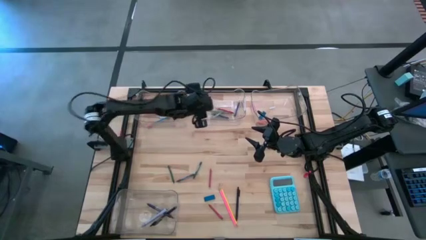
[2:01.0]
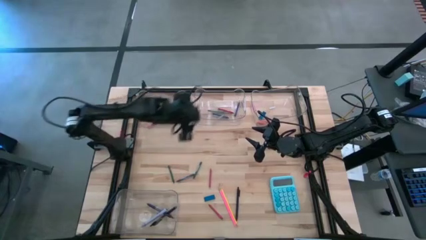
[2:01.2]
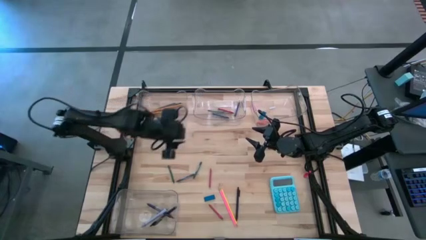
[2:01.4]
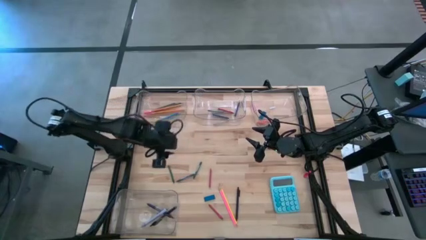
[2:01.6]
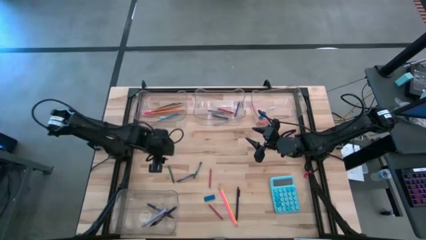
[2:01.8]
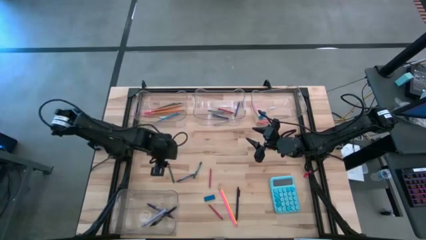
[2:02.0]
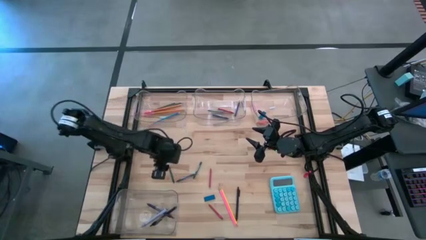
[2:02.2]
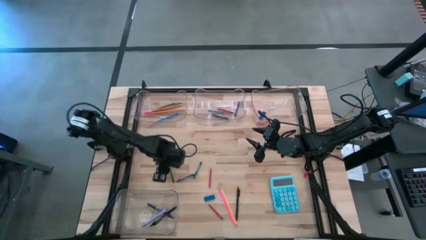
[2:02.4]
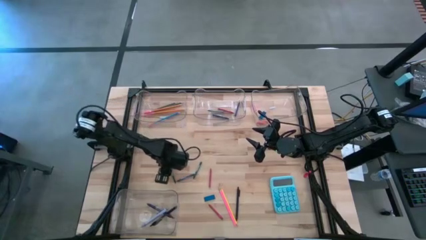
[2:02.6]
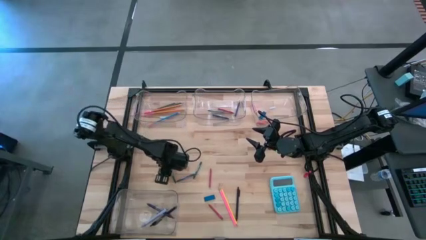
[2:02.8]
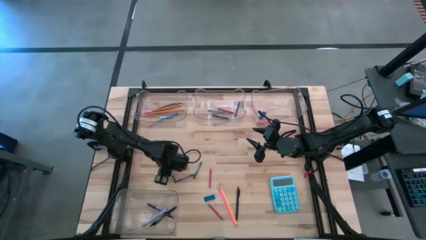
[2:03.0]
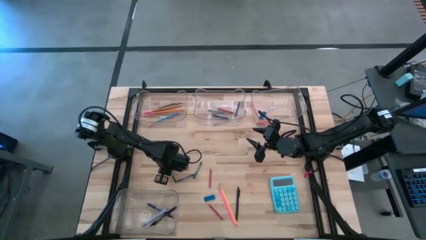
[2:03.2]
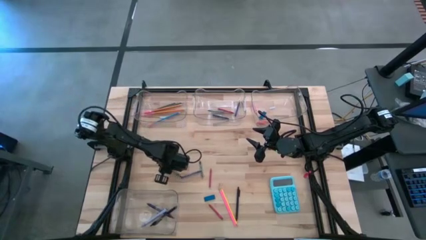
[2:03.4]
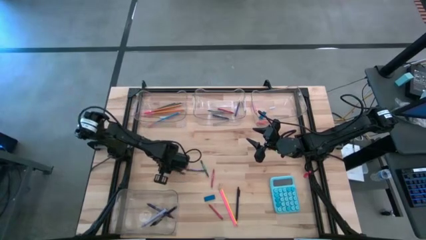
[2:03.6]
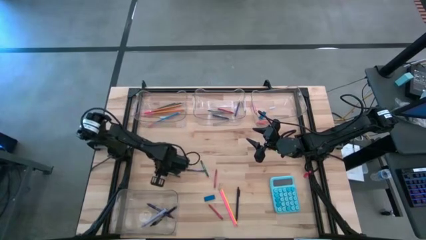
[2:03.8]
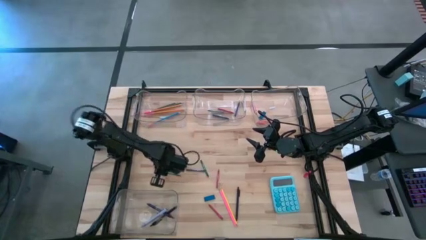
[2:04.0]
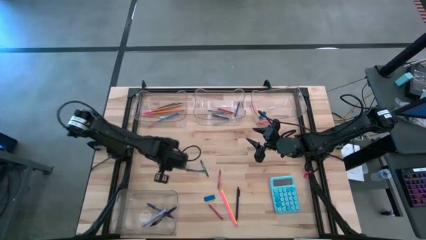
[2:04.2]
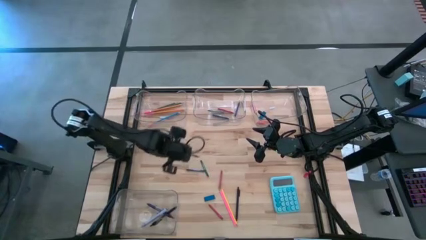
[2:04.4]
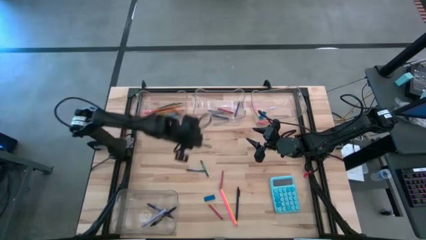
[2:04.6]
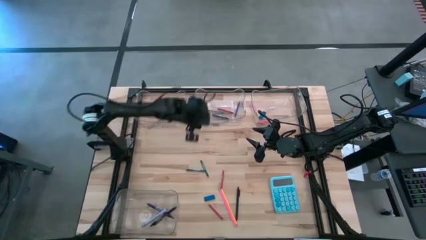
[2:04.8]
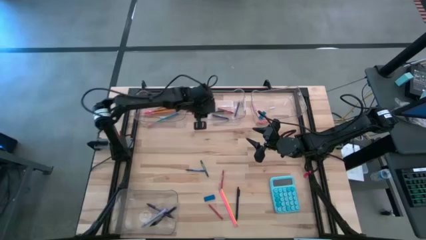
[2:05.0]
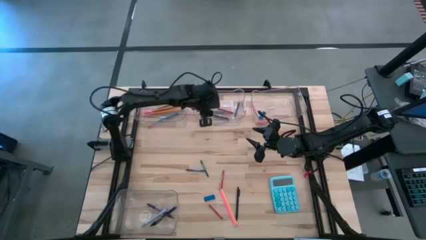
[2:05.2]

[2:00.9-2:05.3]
Task: Sort crayons/erasers/pens/pencils in bins
Put the green crayon into the top middle transparent bin

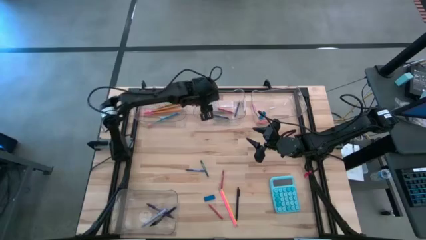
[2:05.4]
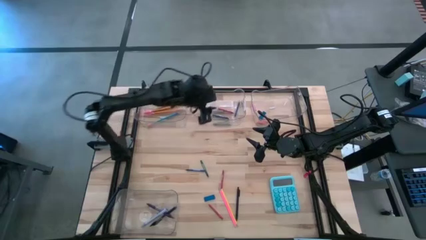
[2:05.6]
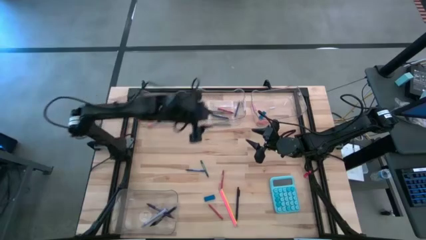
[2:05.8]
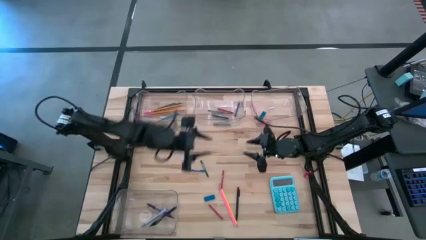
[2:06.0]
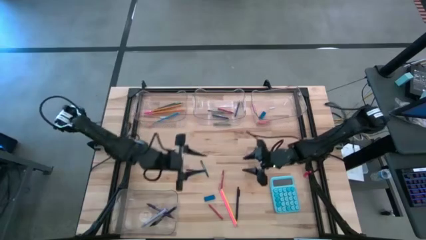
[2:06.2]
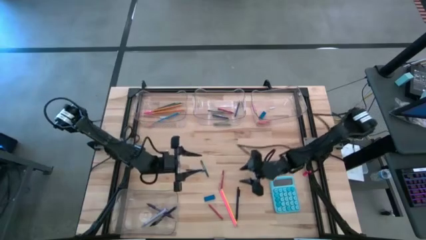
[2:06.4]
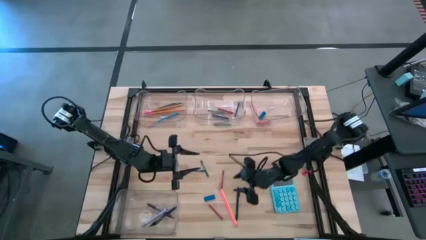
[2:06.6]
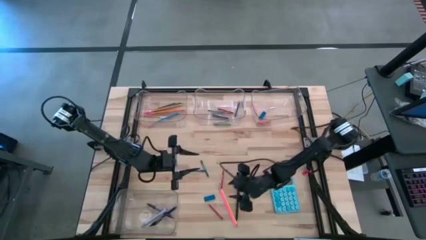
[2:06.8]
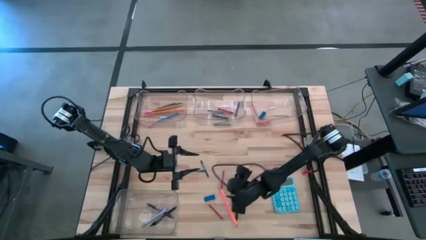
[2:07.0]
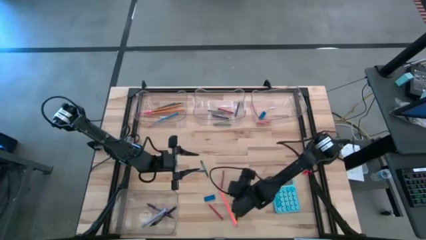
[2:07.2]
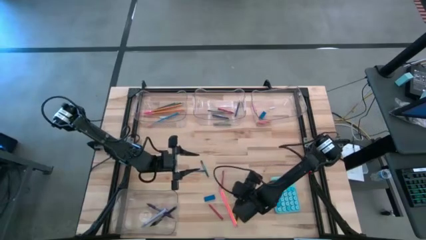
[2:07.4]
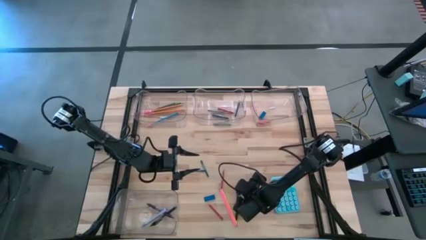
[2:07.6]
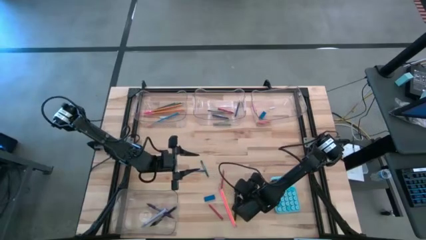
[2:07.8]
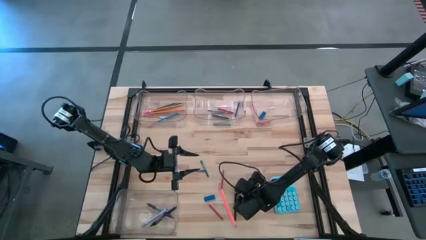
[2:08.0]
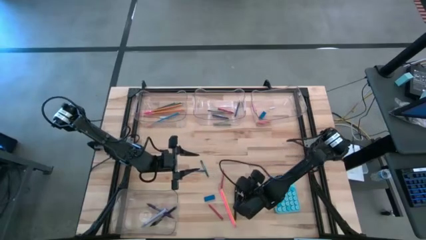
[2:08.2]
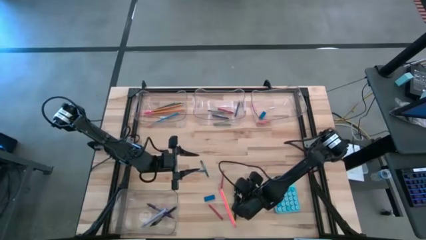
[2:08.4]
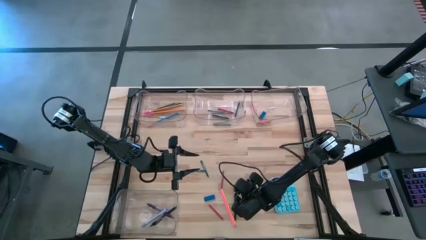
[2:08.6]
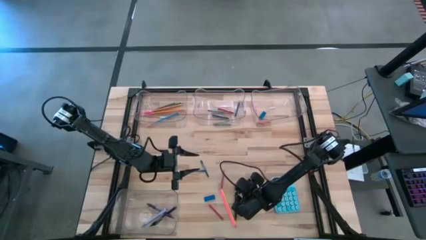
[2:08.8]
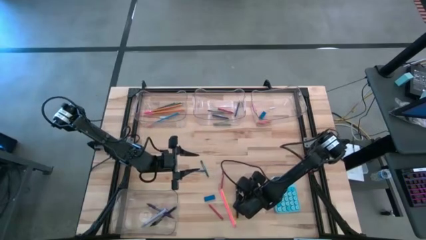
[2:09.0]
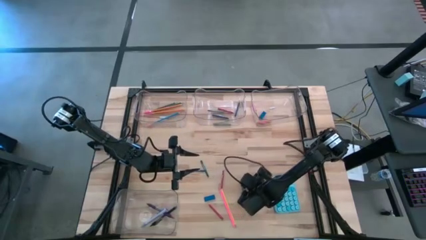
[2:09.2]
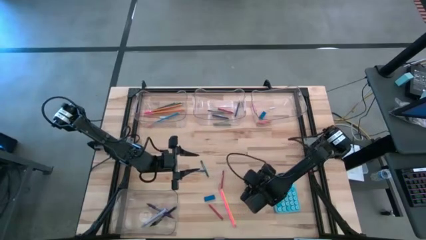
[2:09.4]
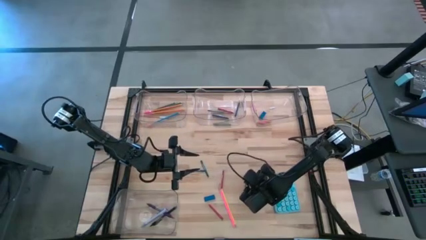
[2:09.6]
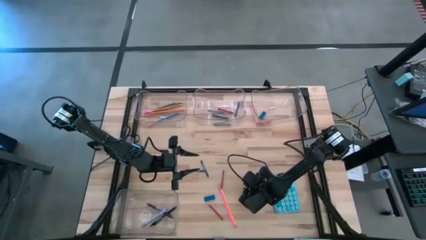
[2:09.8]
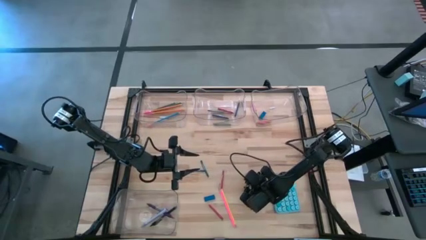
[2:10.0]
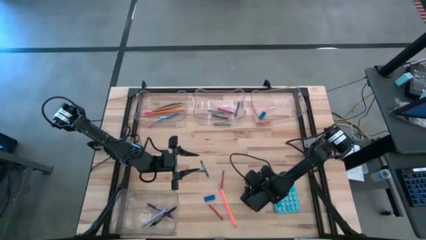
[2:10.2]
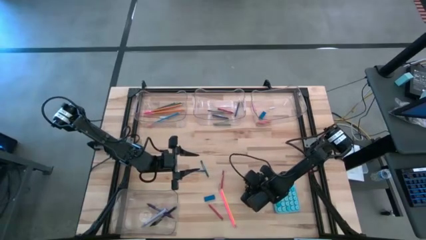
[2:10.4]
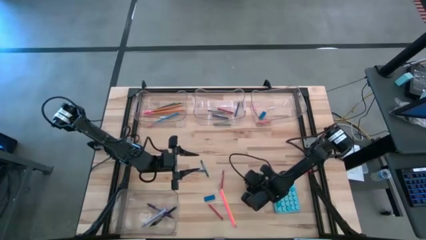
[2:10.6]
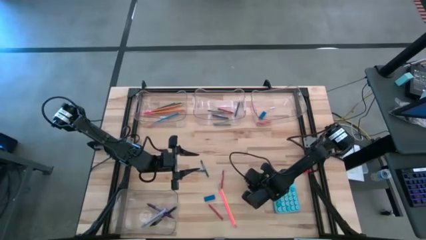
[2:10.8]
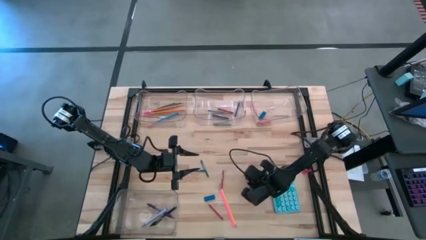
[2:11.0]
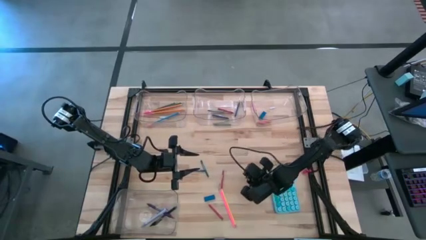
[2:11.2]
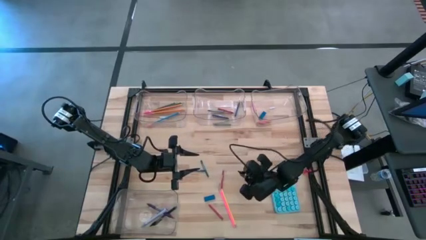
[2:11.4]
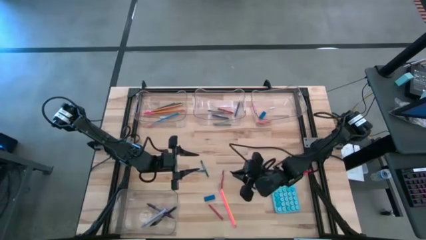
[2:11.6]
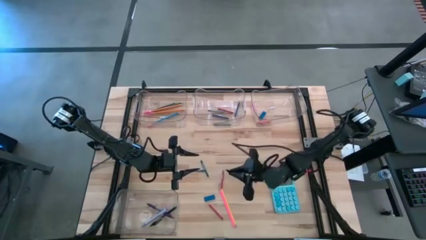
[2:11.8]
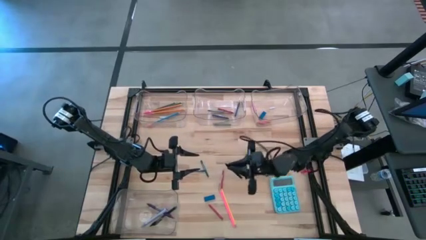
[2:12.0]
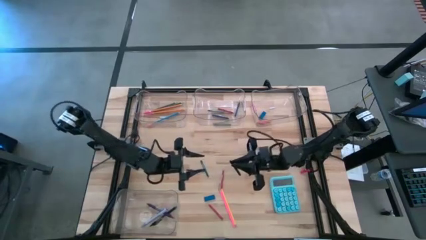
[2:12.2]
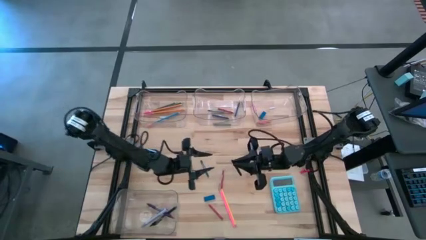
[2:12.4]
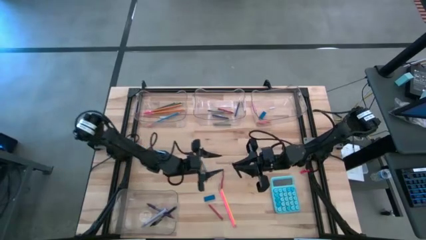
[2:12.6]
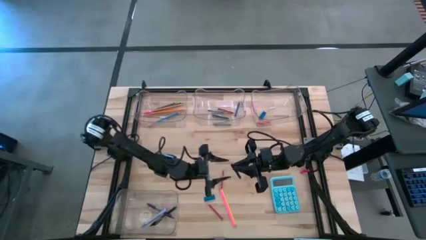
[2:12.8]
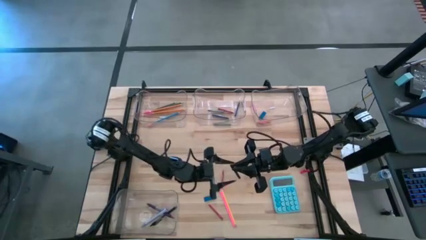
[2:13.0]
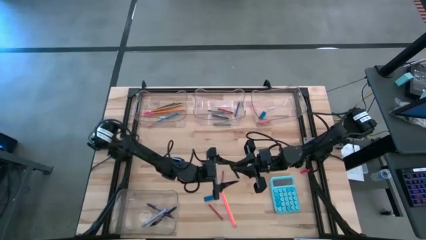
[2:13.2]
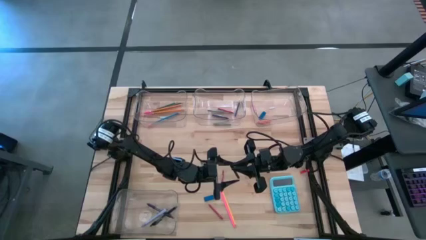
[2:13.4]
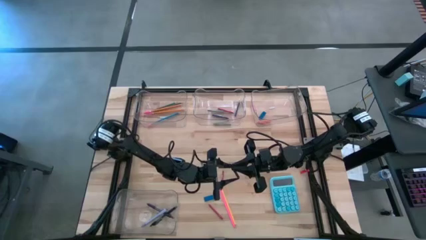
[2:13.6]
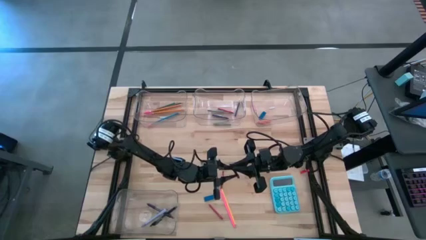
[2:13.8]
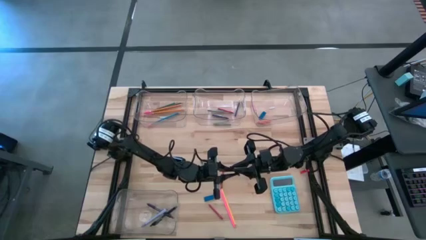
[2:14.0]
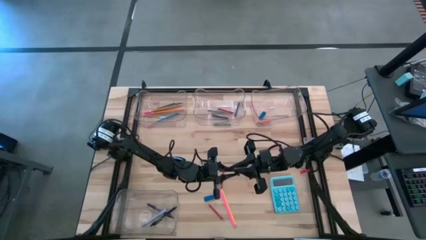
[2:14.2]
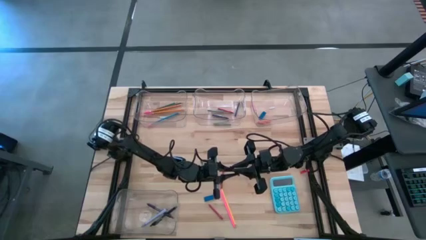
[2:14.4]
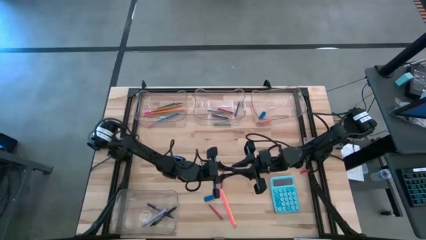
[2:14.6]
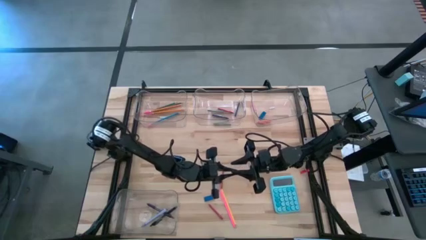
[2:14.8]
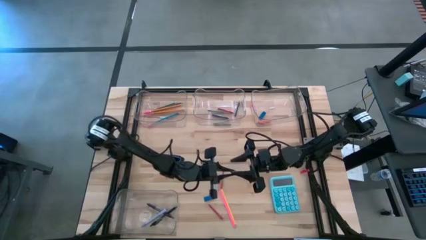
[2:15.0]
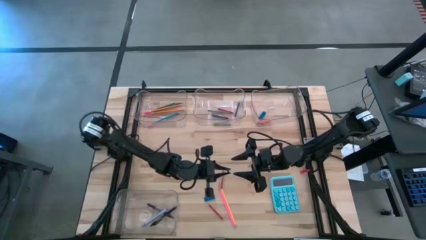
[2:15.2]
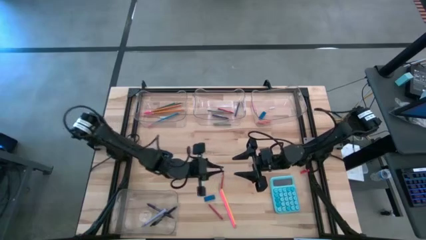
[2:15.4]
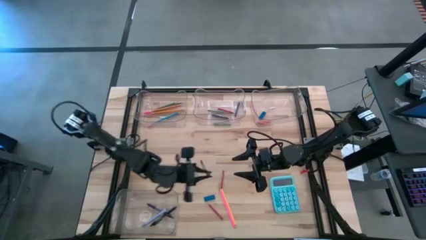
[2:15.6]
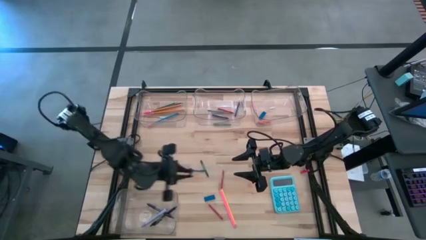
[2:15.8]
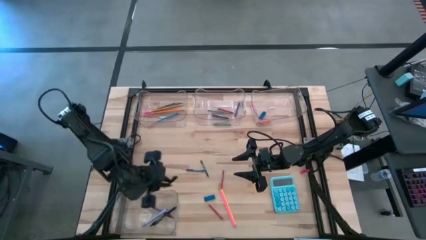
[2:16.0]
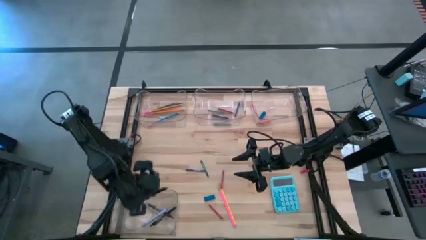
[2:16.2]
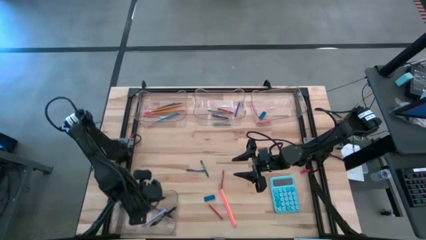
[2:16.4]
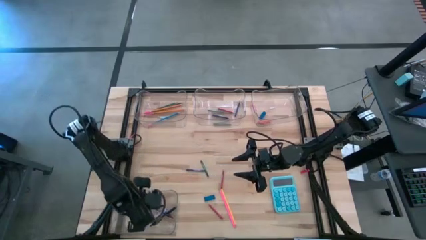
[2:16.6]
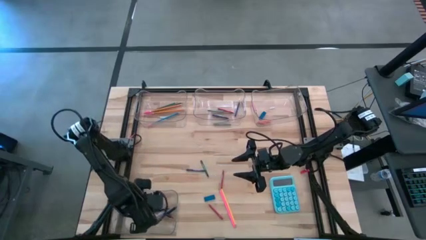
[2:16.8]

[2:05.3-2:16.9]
Put the black pen into the bottom transparent bin
